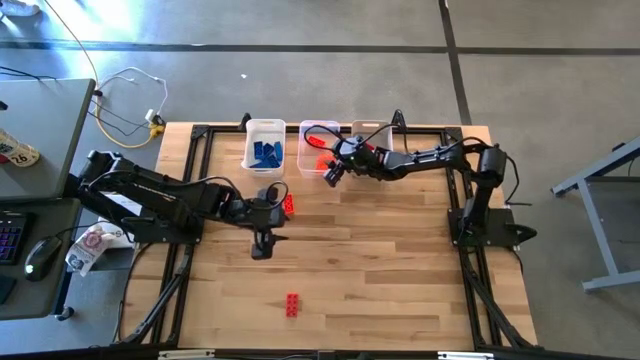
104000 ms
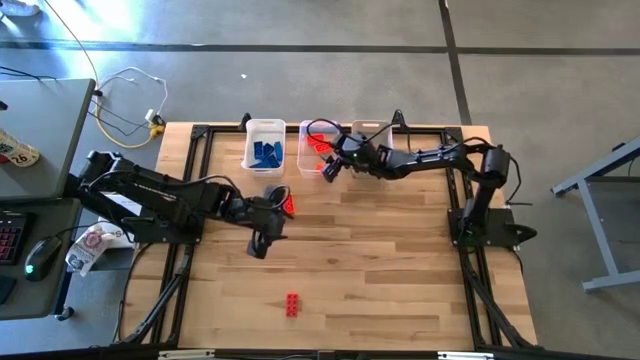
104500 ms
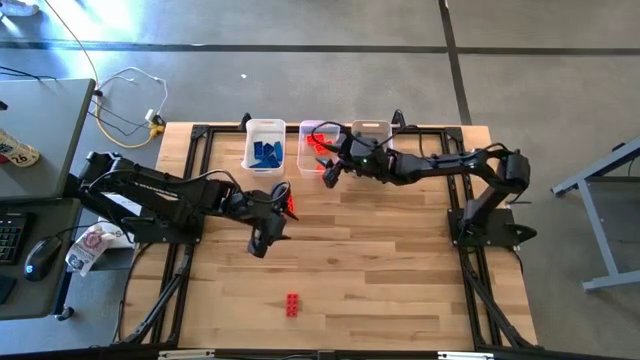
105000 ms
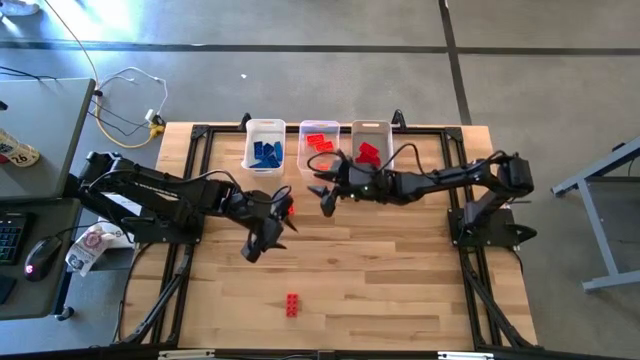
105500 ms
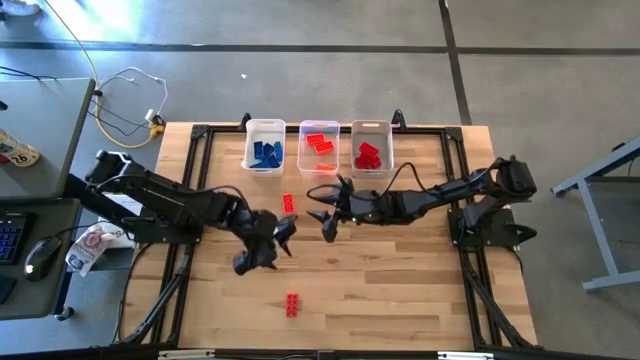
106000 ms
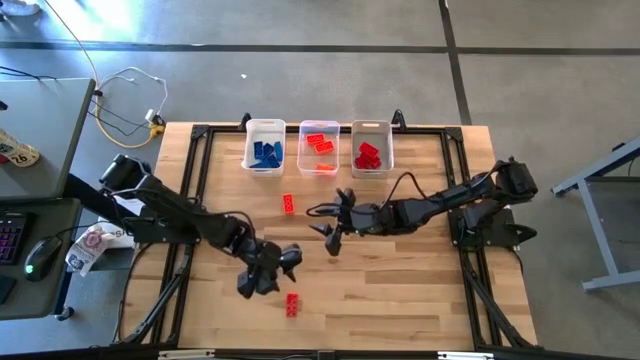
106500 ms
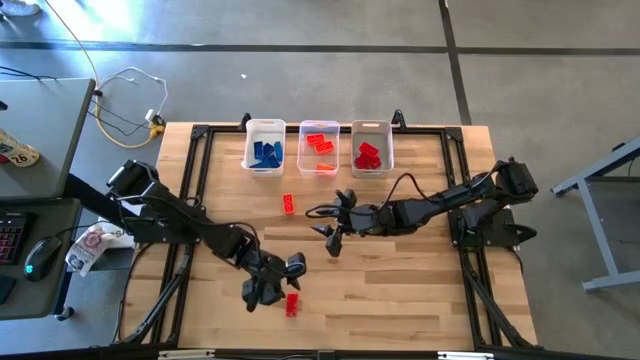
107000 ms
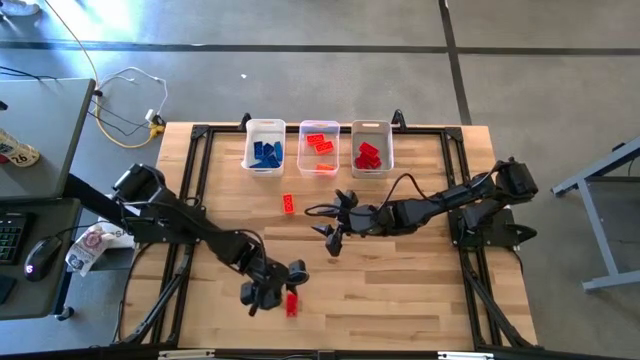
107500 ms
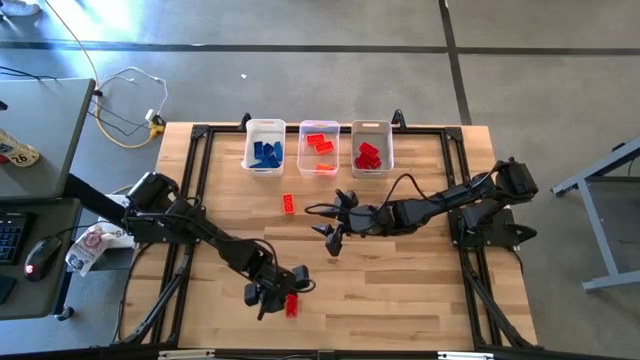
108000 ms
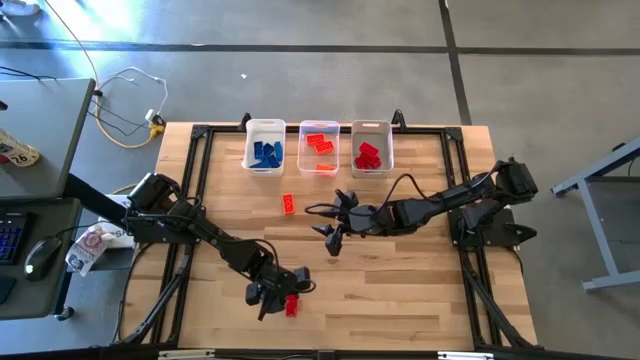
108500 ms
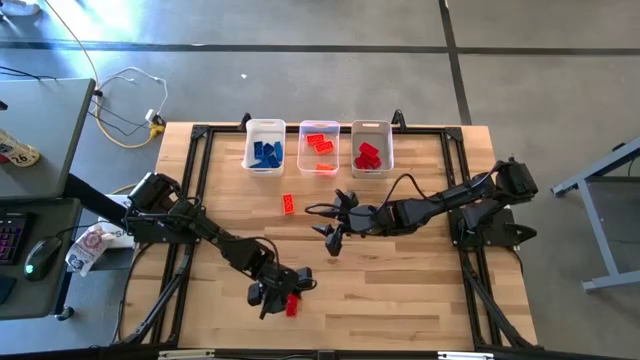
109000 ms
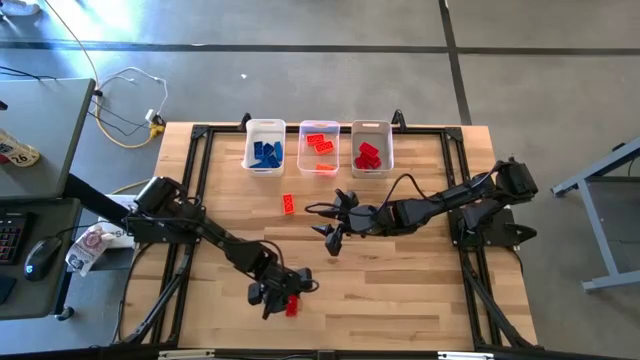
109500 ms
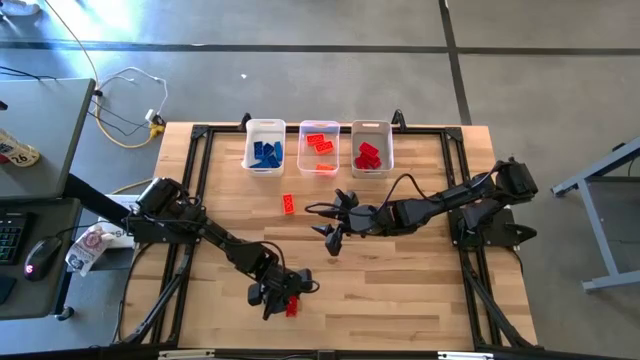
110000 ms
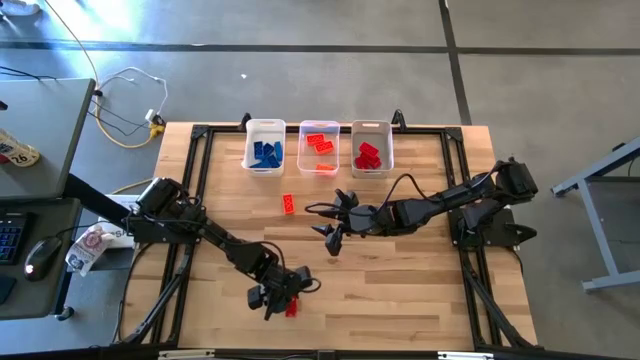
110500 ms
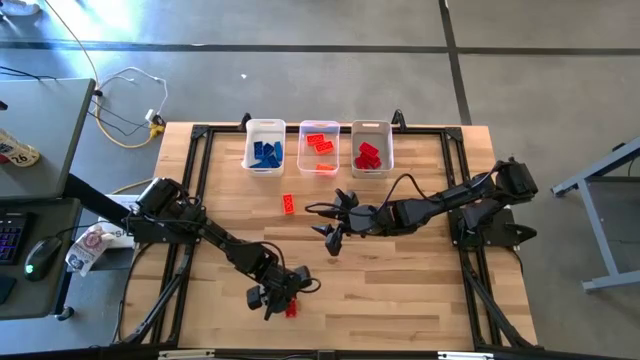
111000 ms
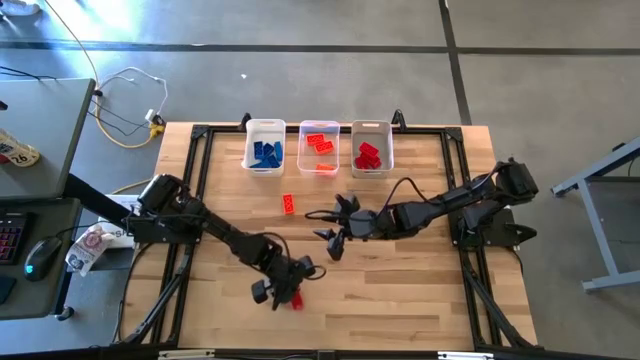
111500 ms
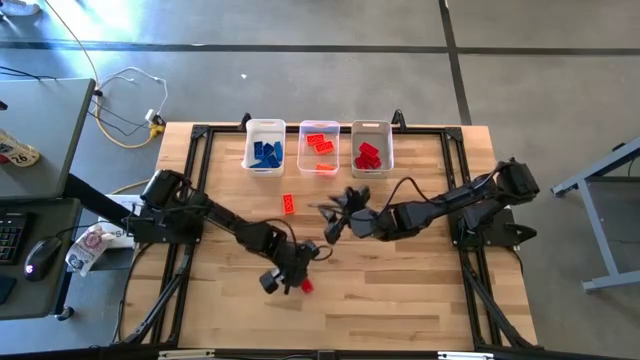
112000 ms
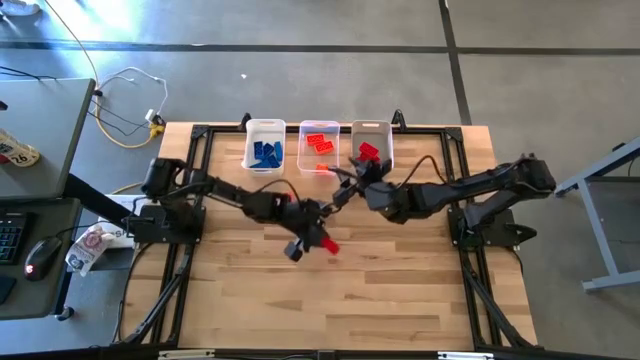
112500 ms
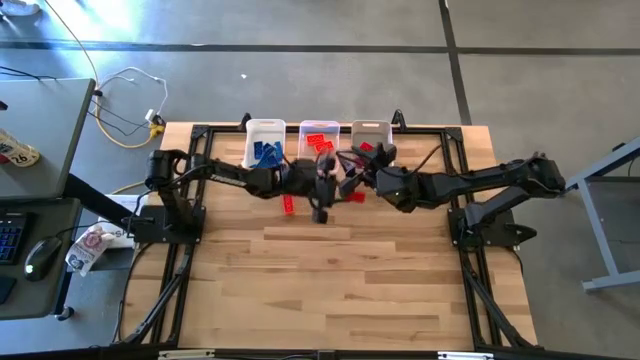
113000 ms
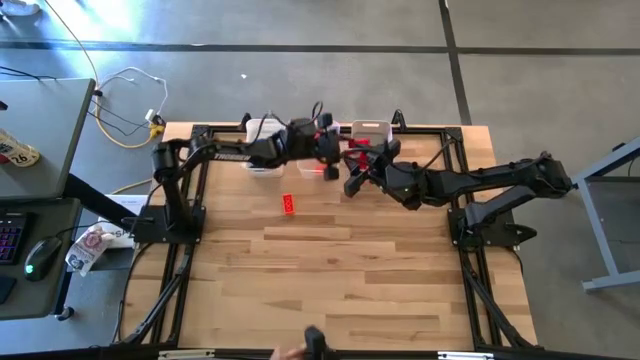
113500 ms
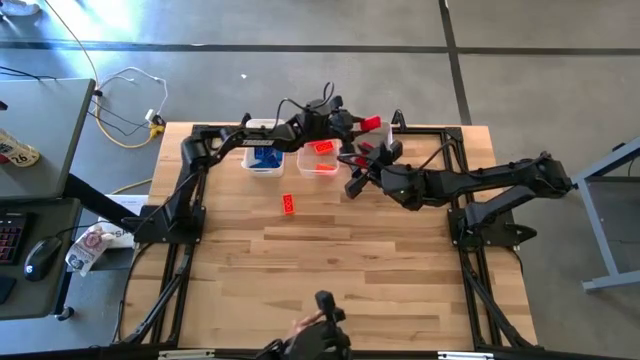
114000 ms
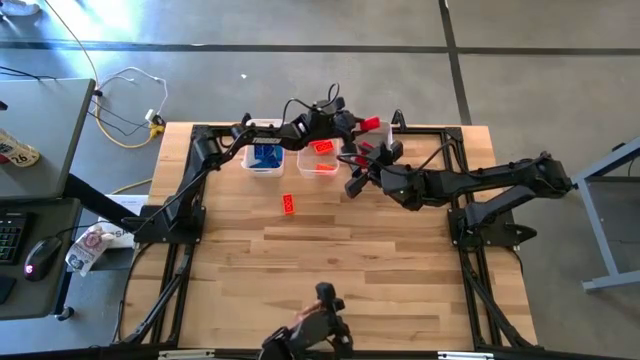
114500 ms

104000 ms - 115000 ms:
Task: Sort & place blocks by color
Put the red game piece into the gray bin

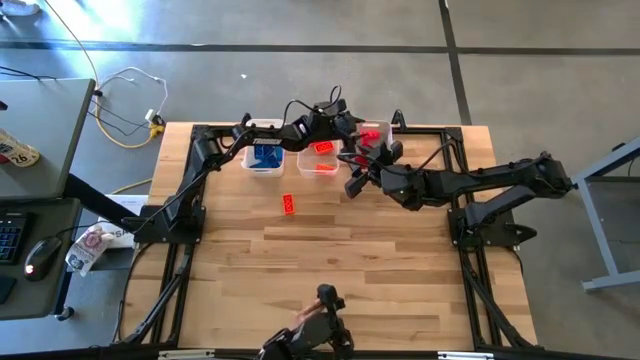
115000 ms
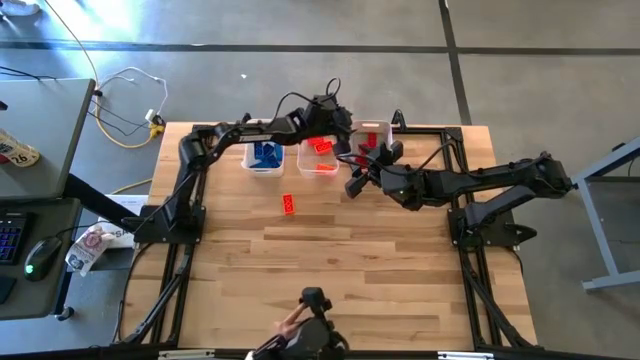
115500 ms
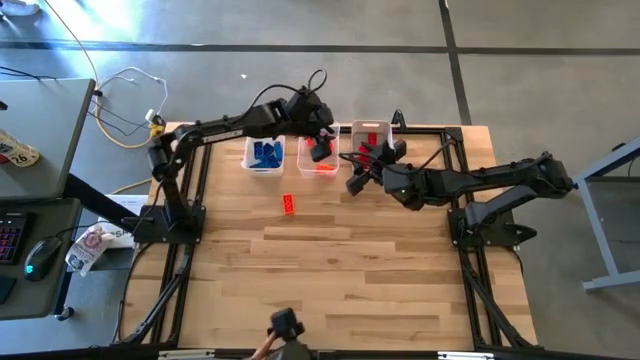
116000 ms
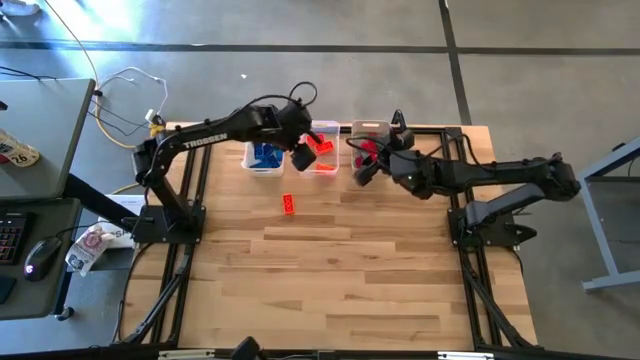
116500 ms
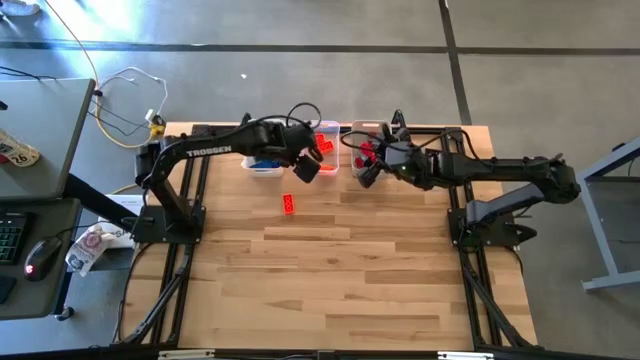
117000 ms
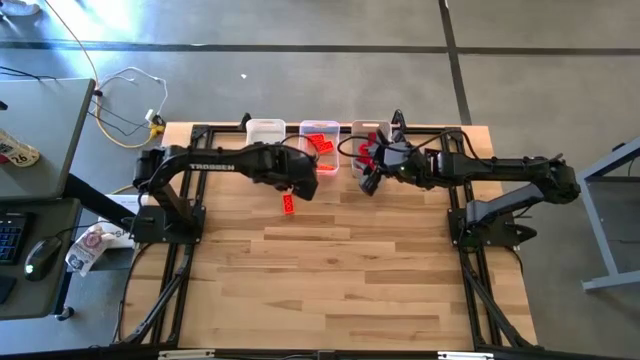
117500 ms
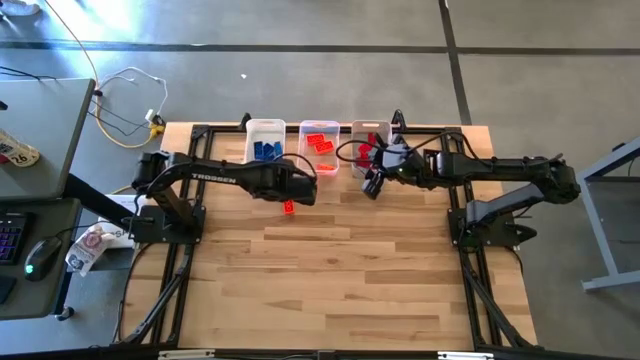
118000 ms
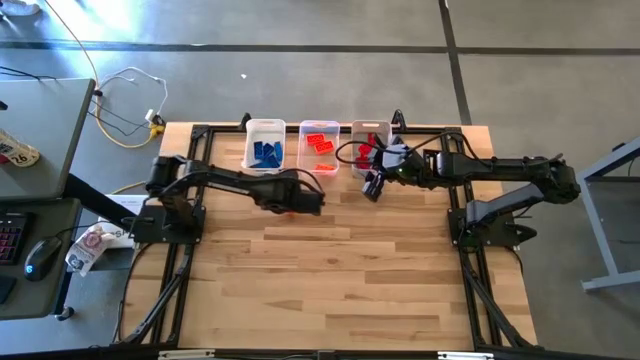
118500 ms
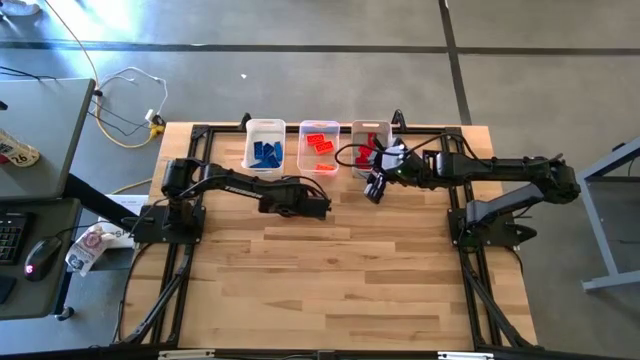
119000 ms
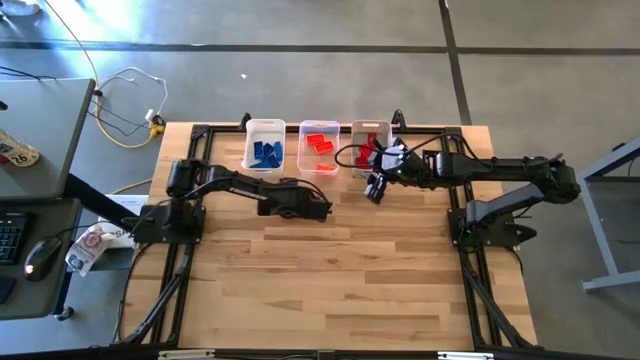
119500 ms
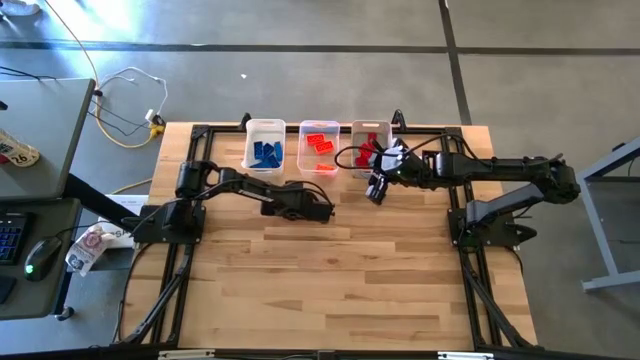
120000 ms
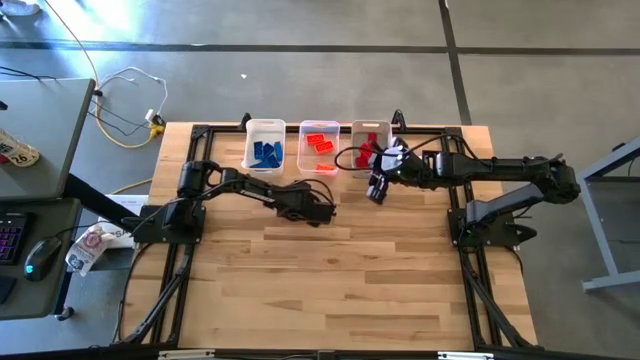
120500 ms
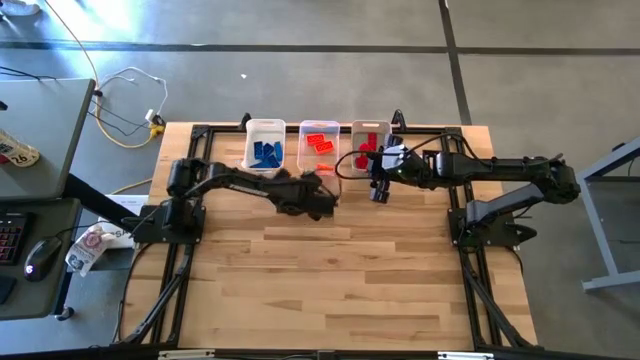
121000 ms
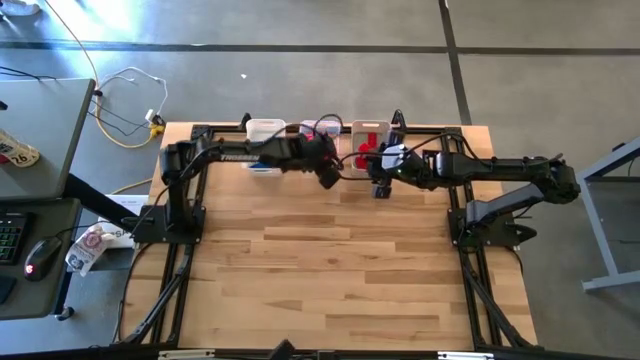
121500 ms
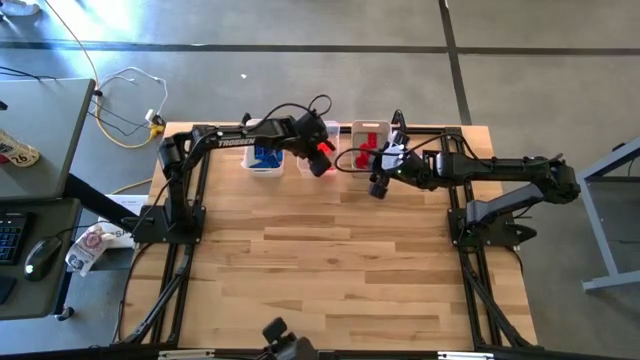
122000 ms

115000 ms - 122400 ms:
Put the orange game piece into the transparent bin

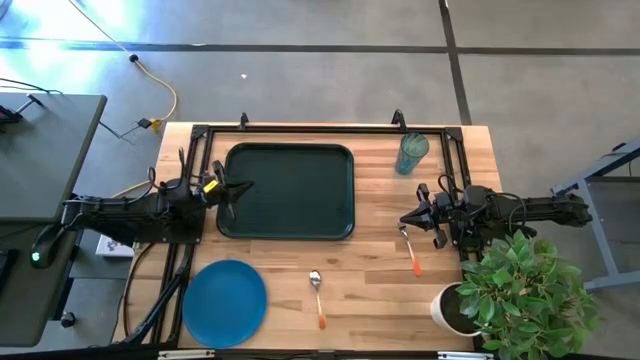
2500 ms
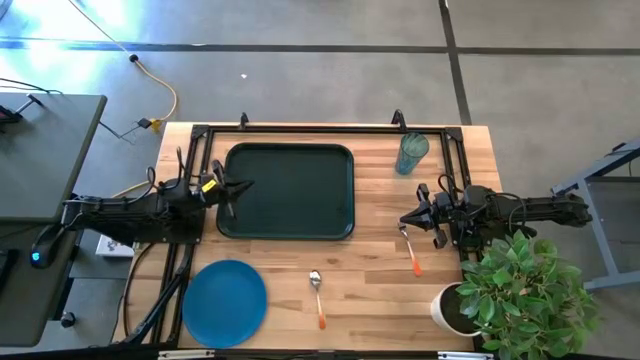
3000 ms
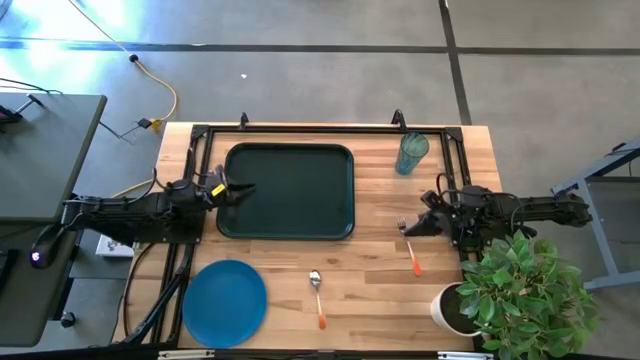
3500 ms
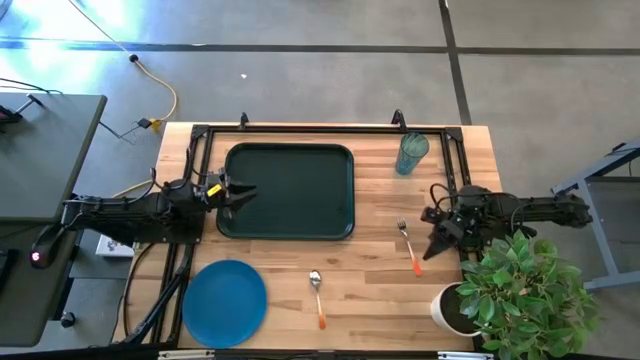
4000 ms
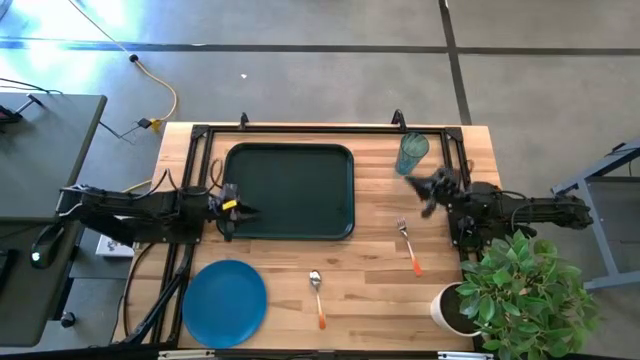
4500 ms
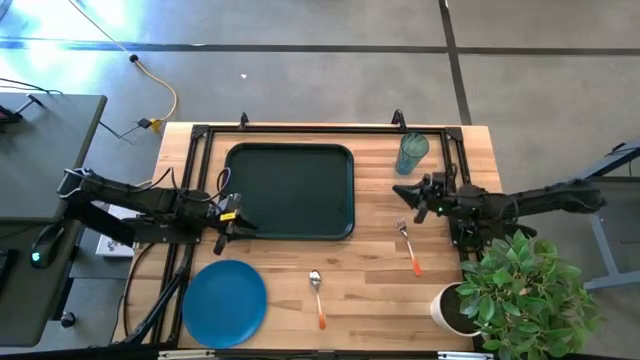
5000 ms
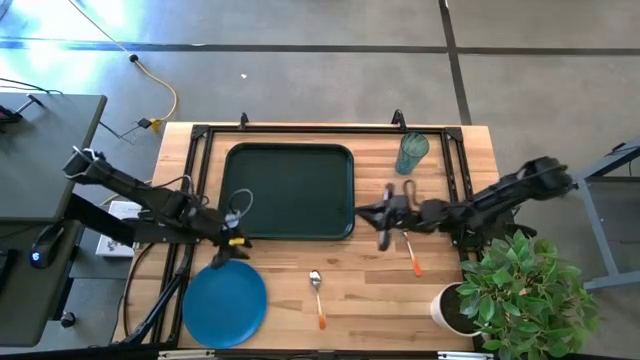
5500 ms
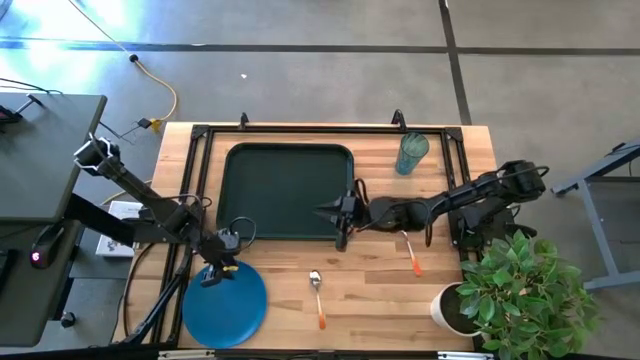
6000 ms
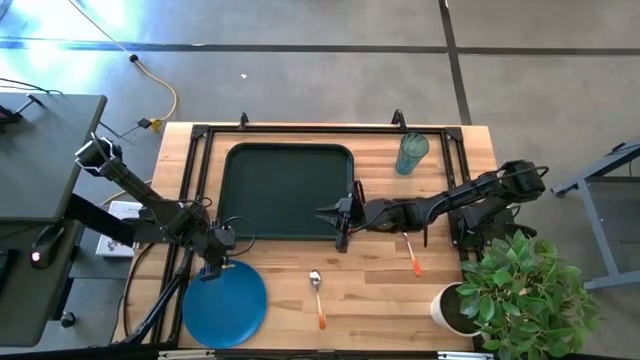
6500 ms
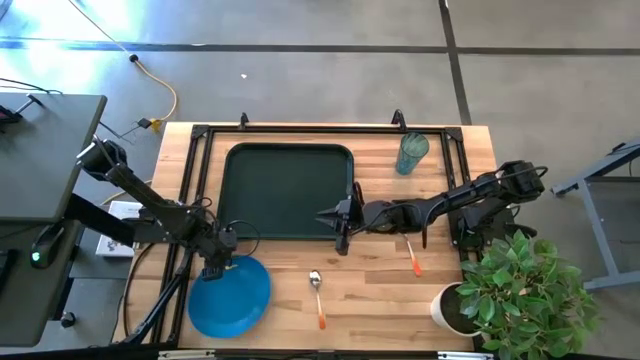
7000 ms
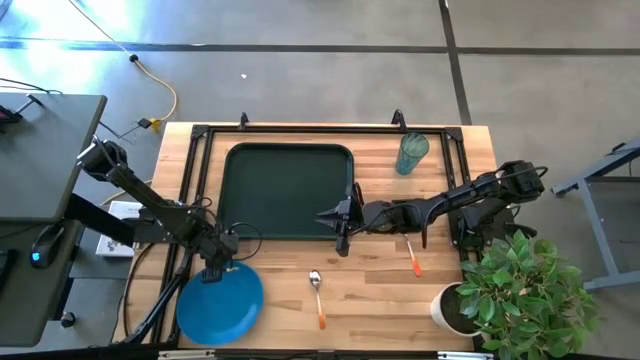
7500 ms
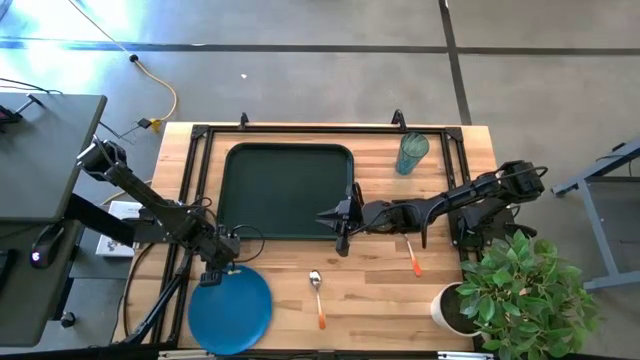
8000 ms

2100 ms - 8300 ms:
Task: Pick and place plate/cup/fork/spoon on tray
Put the blue plate on the black tray
